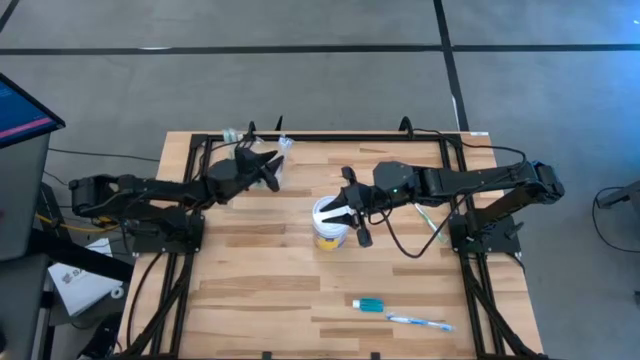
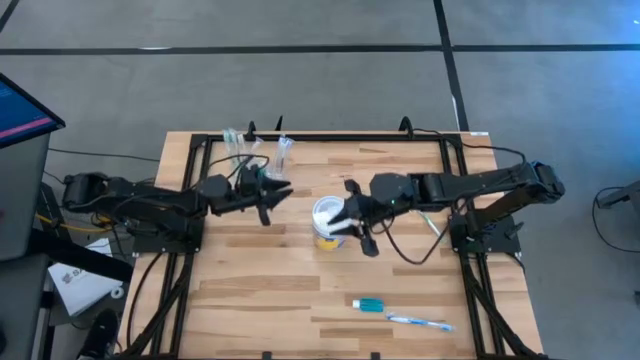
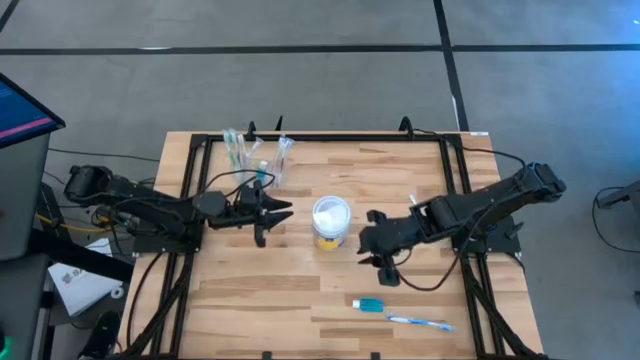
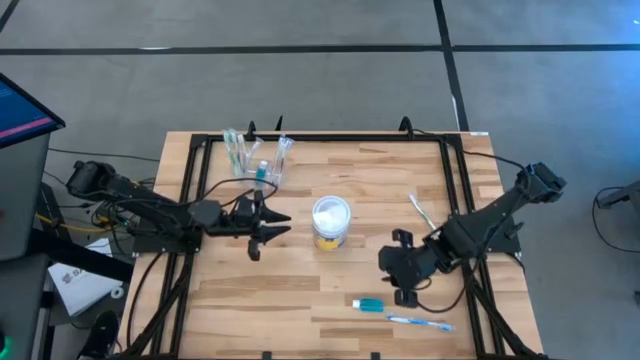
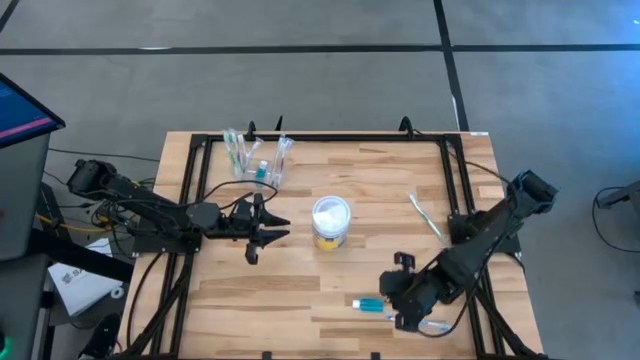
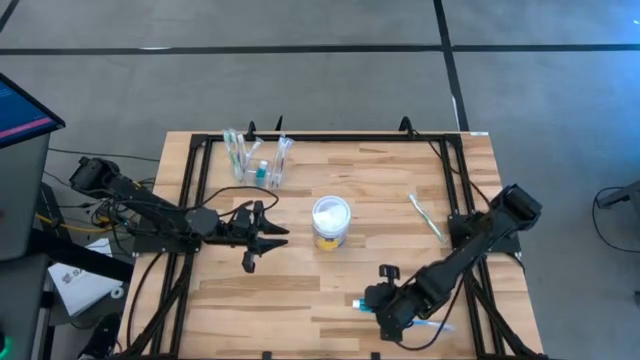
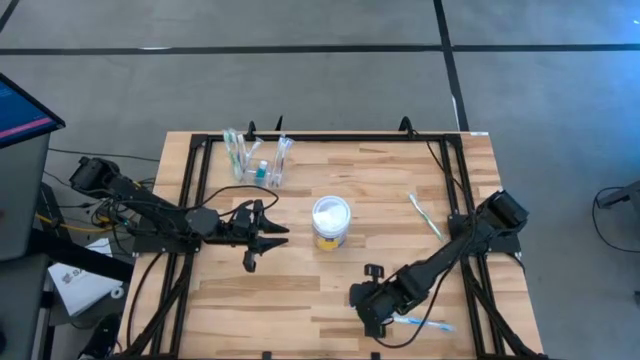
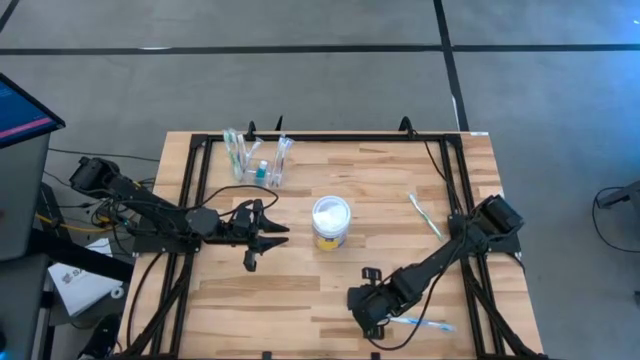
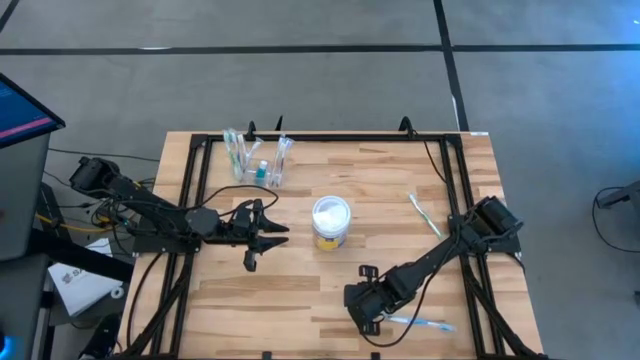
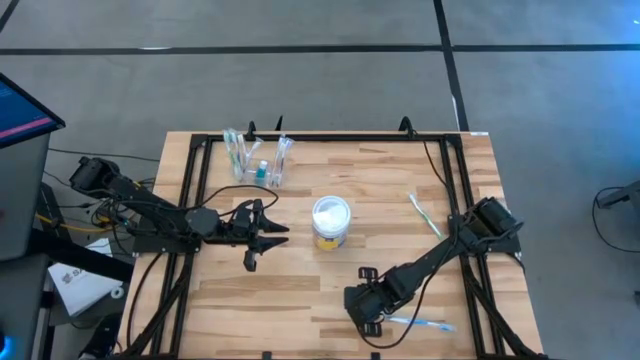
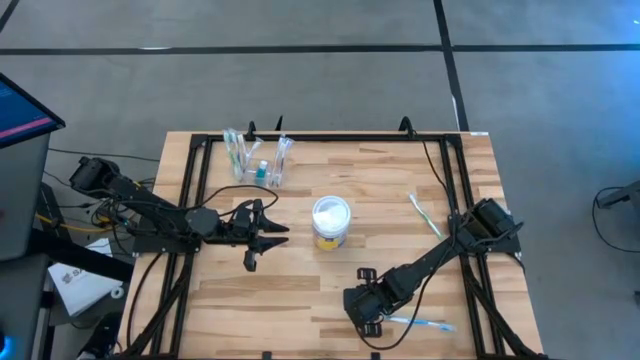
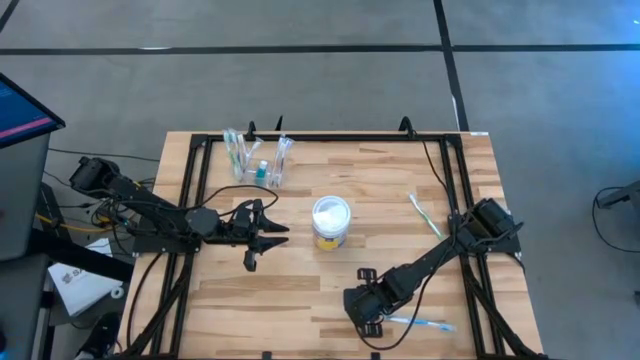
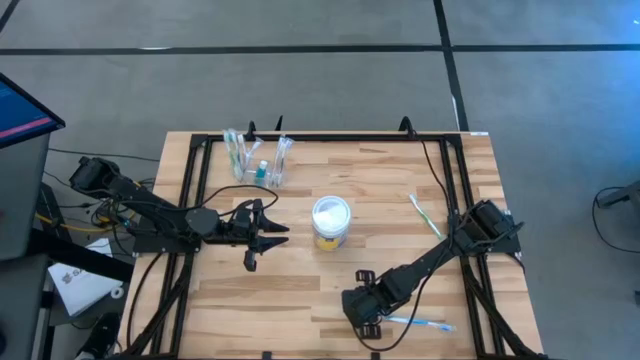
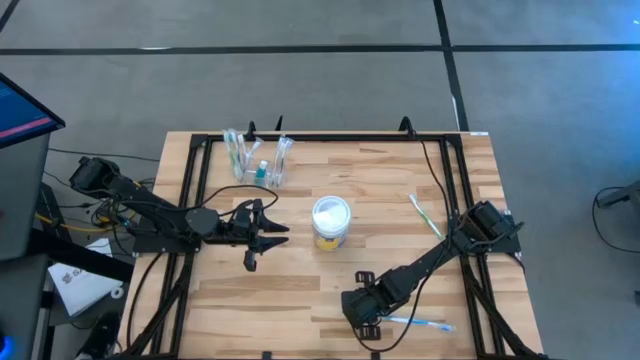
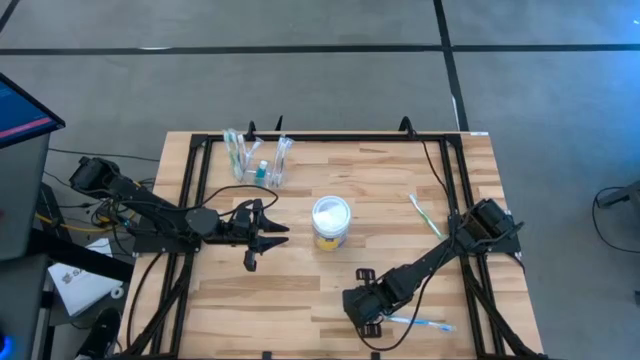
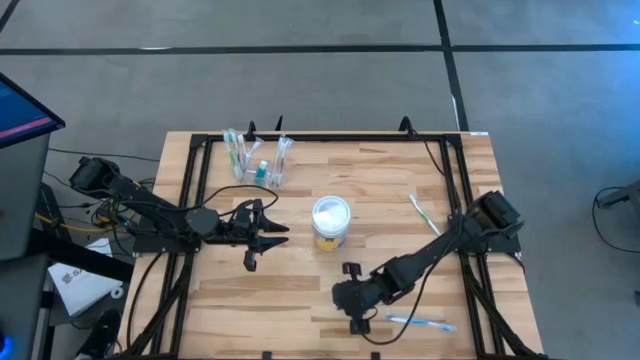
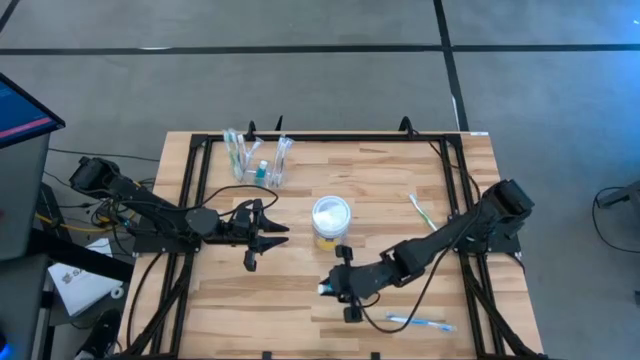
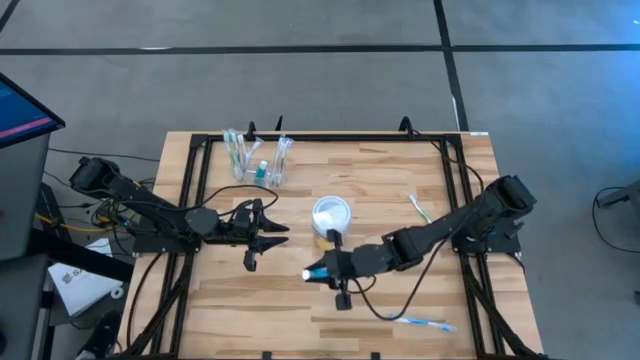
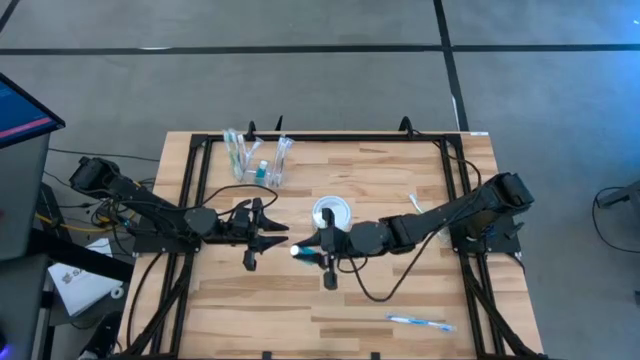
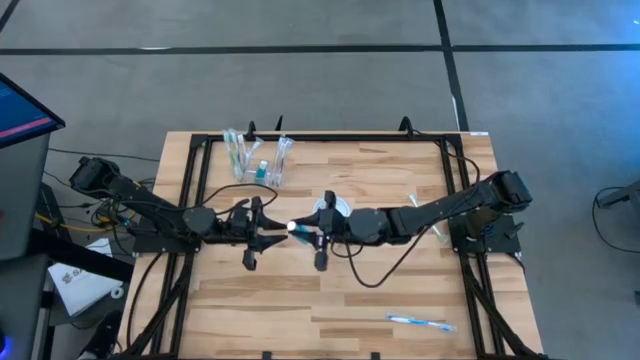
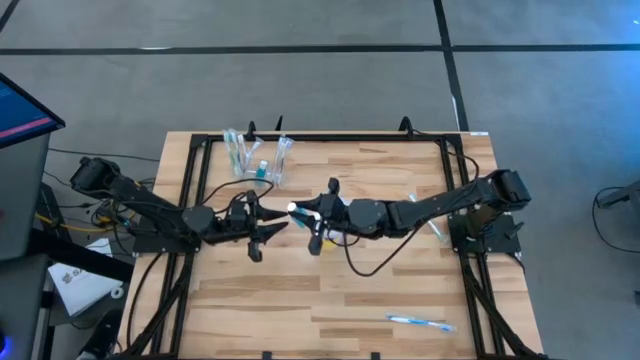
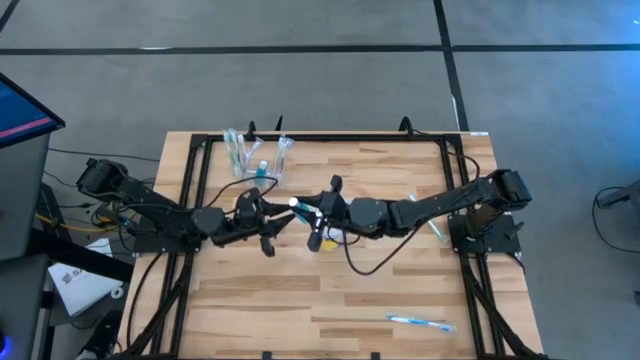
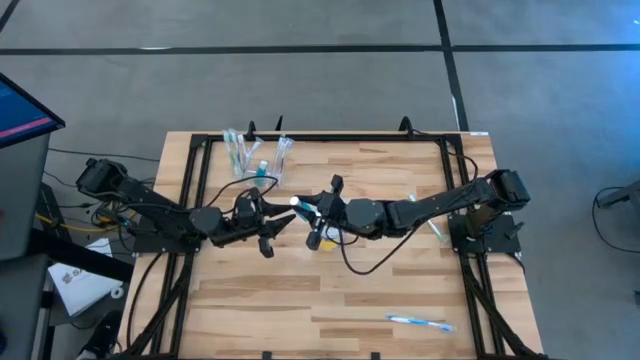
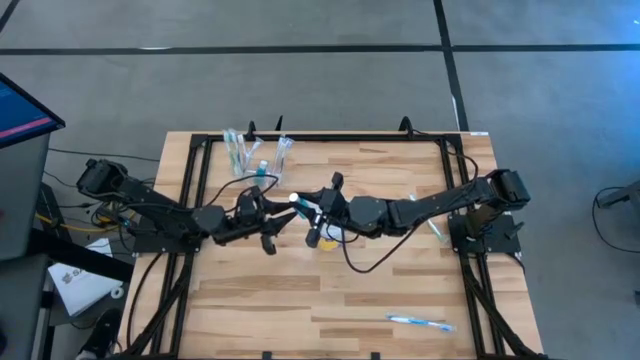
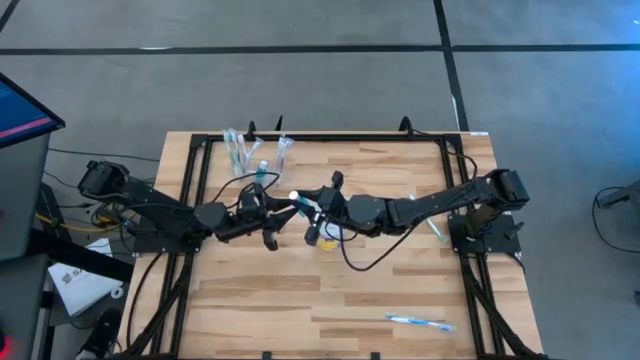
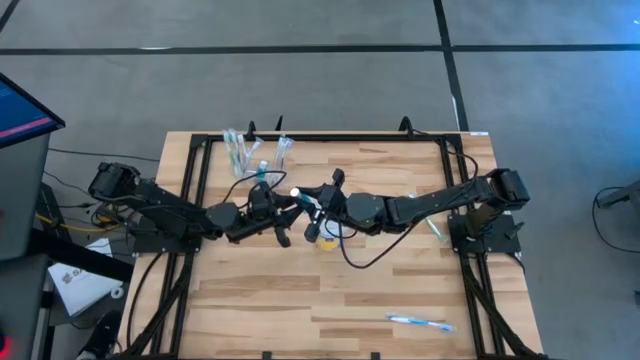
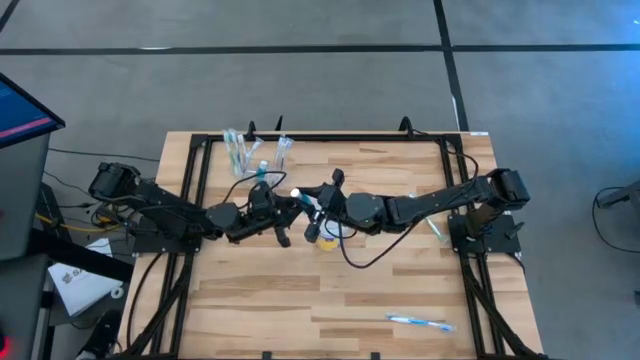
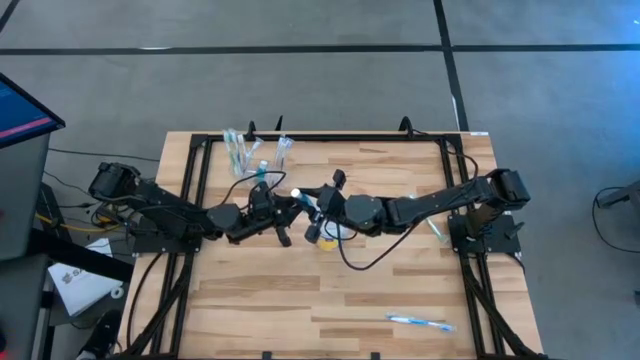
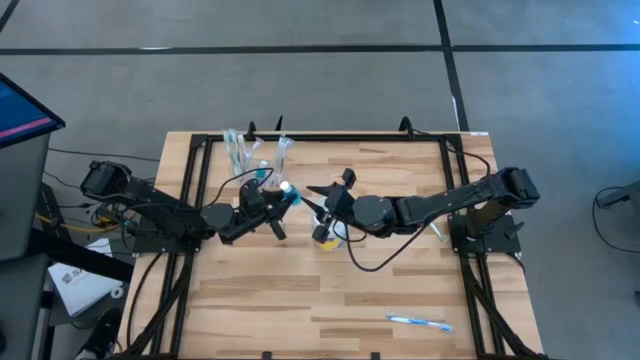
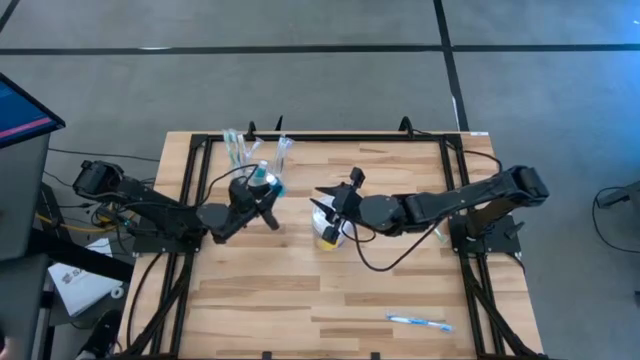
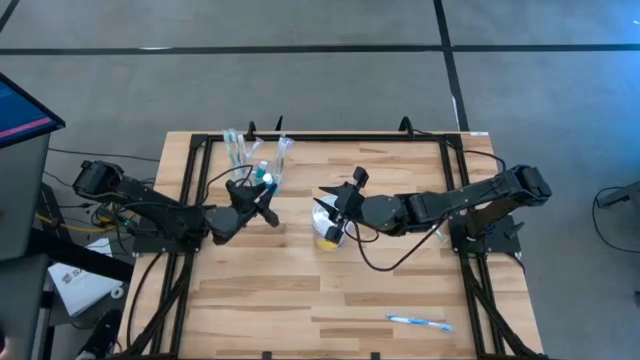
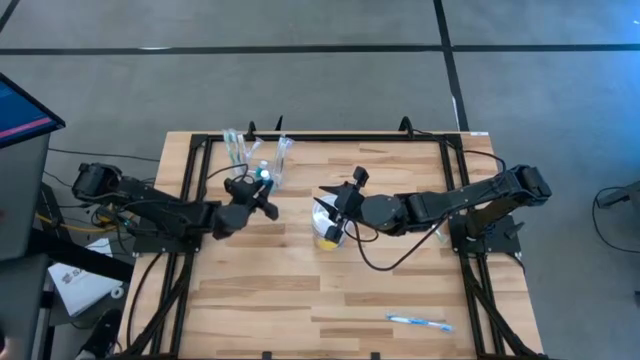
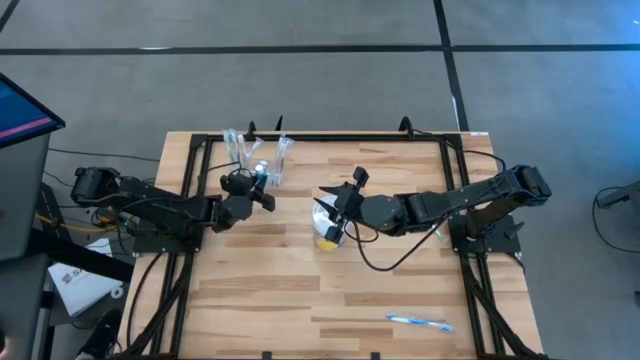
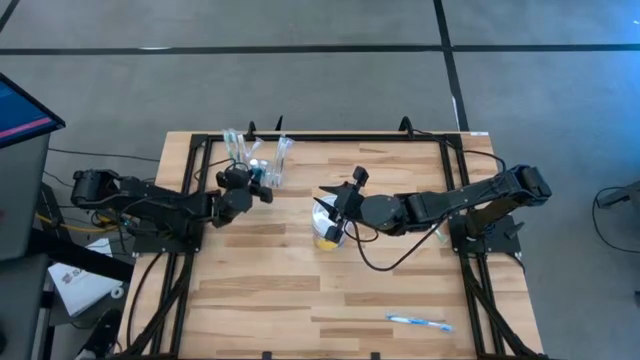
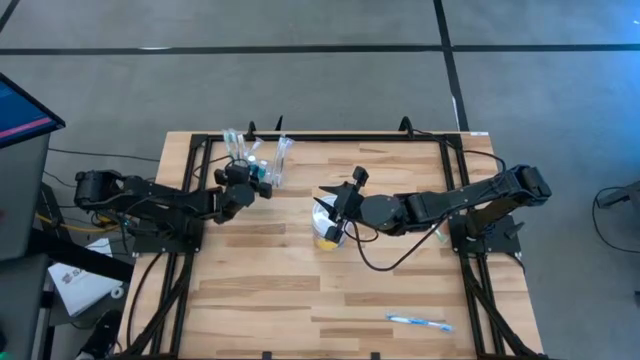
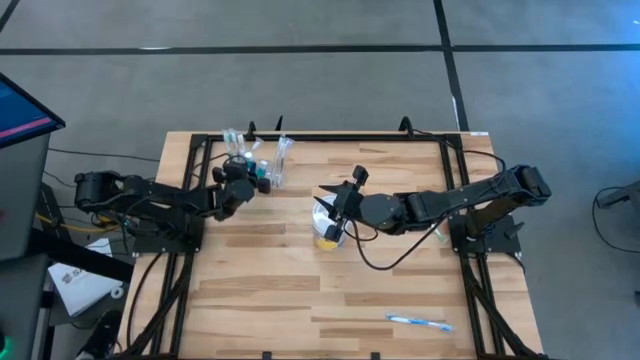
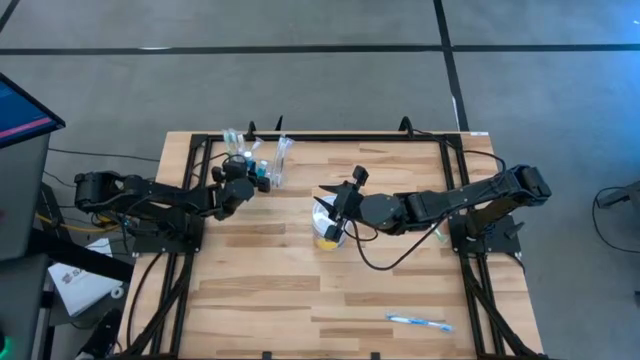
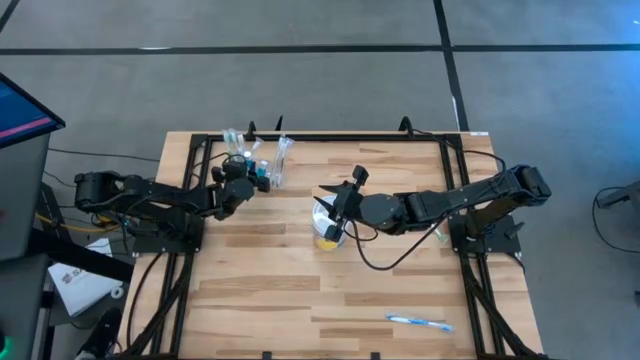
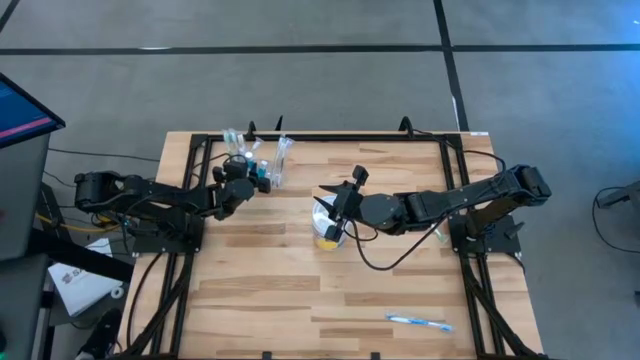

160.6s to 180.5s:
Task: Pick & Place toothbrushing station
Put the mouthwash into the transparent organizer

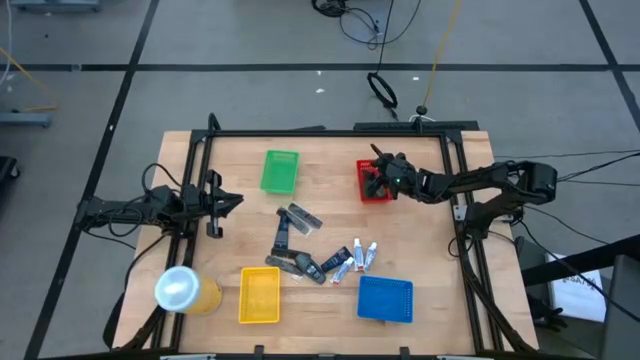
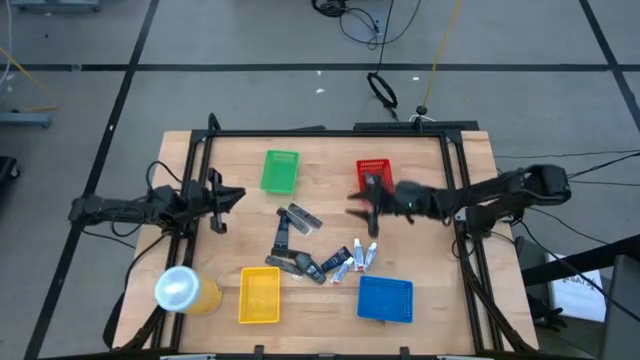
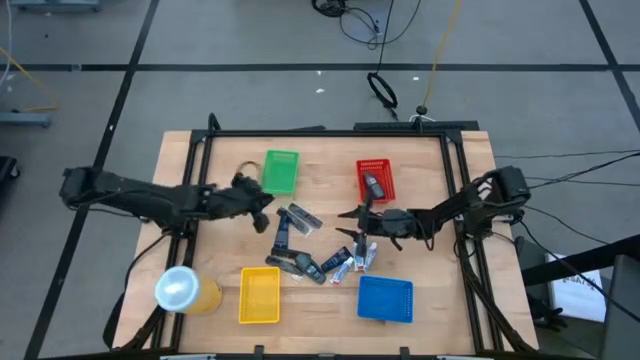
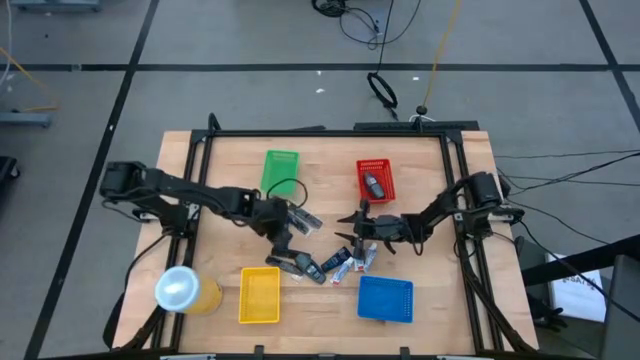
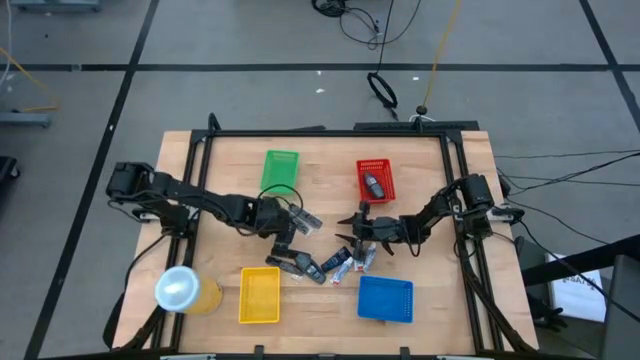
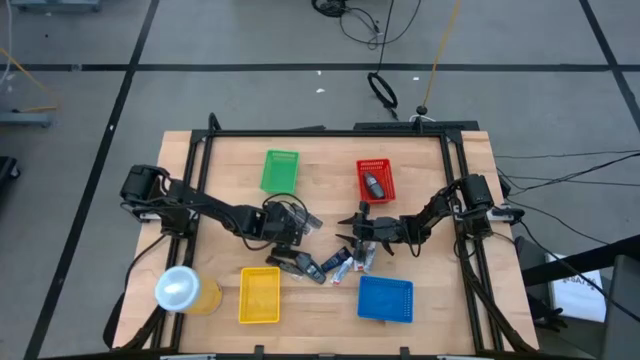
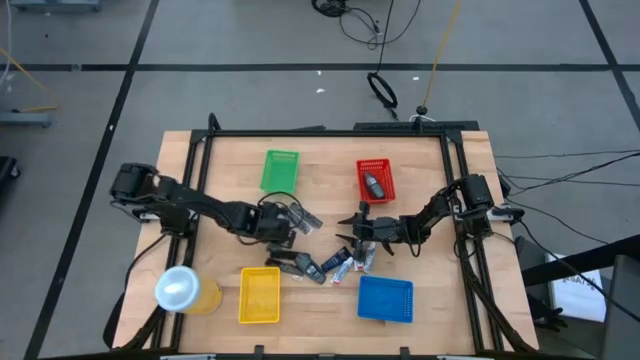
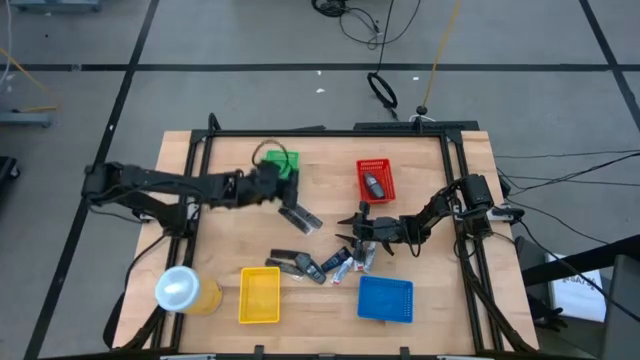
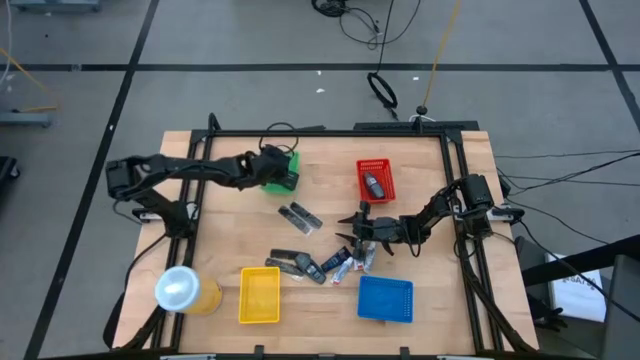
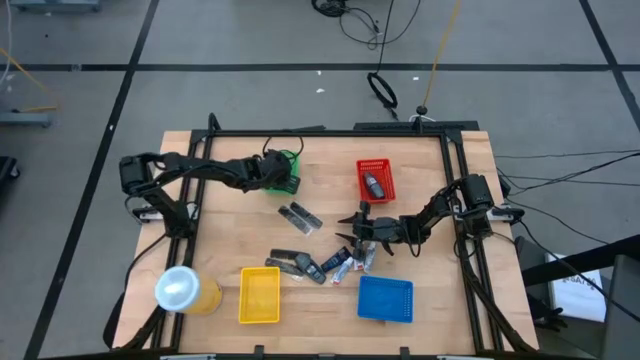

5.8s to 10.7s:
Task: Pick & Place Travel size toiletries
Put the left blue shave cream bottle into the green bin
